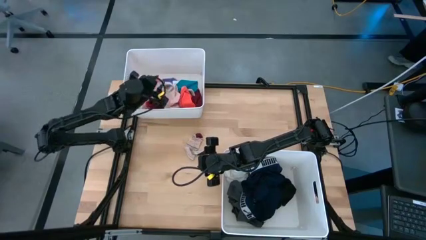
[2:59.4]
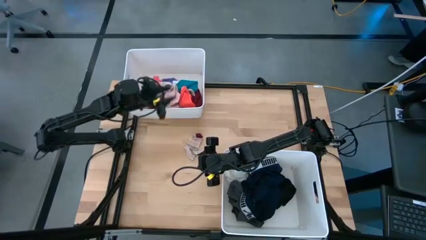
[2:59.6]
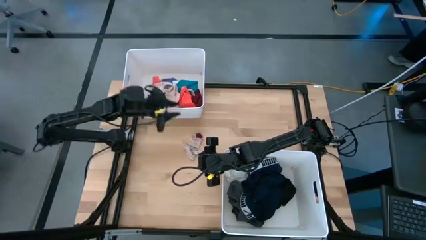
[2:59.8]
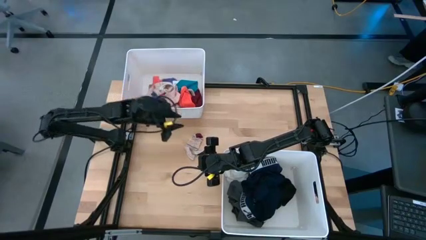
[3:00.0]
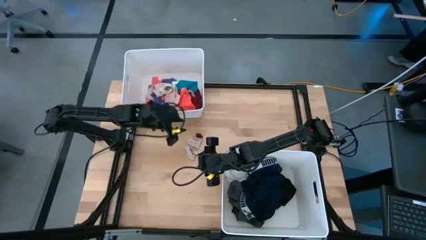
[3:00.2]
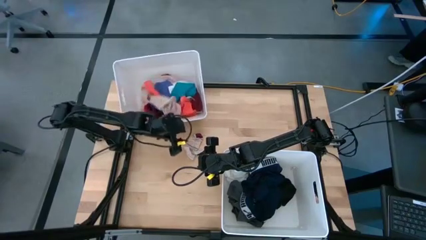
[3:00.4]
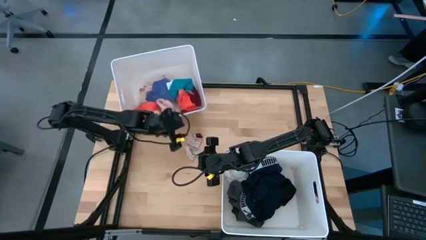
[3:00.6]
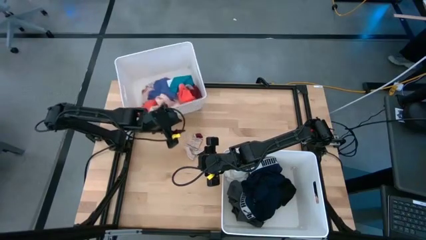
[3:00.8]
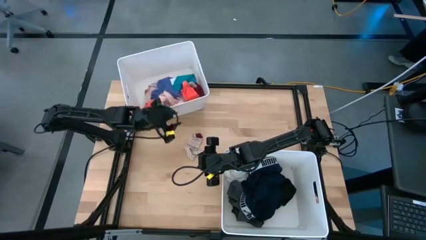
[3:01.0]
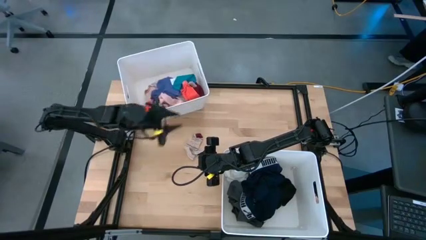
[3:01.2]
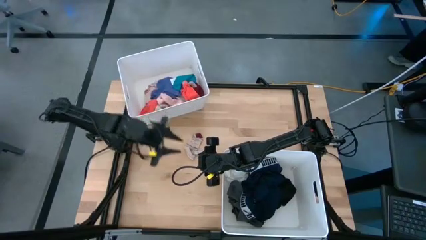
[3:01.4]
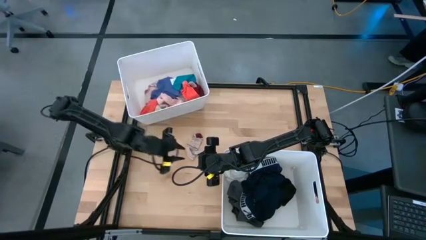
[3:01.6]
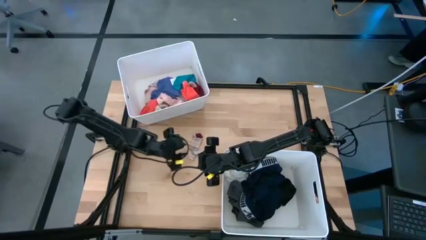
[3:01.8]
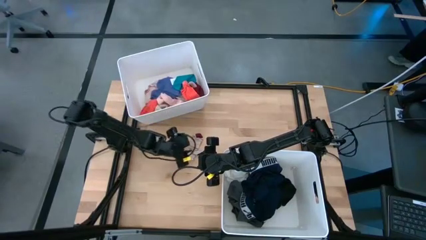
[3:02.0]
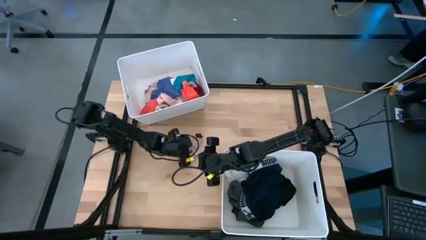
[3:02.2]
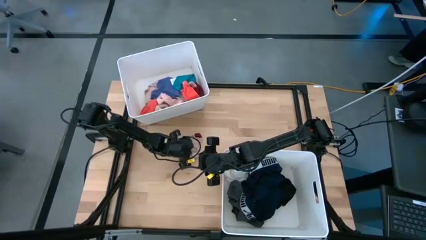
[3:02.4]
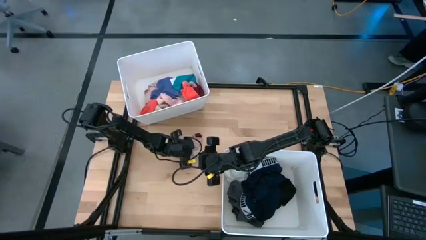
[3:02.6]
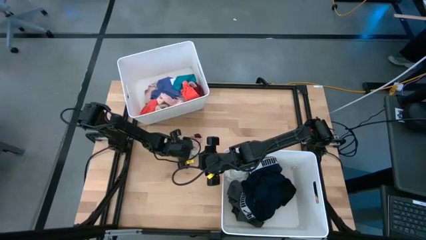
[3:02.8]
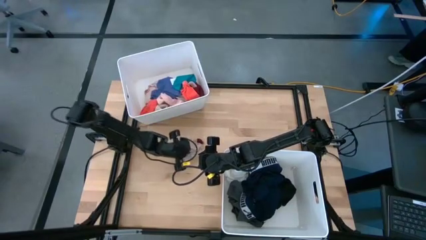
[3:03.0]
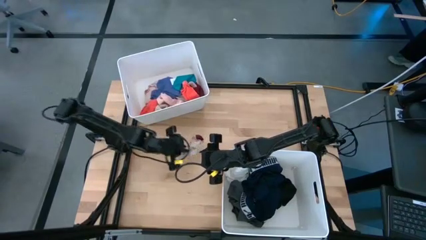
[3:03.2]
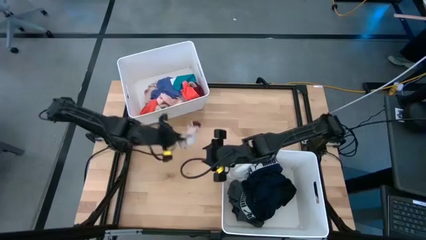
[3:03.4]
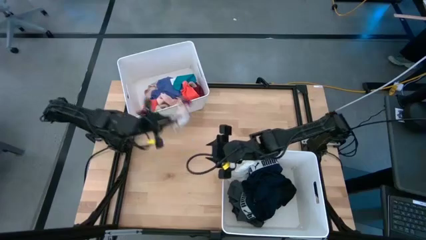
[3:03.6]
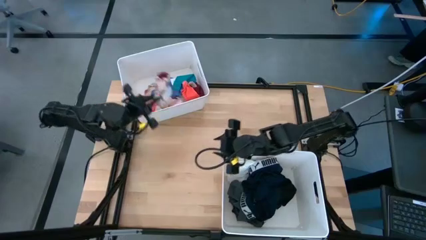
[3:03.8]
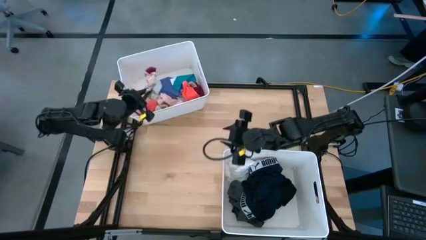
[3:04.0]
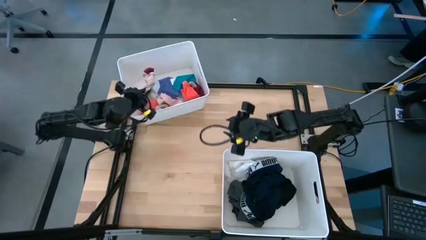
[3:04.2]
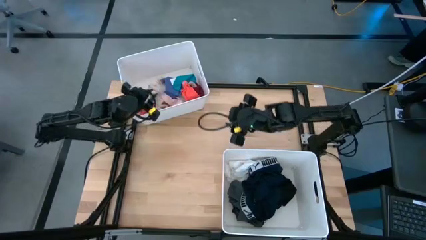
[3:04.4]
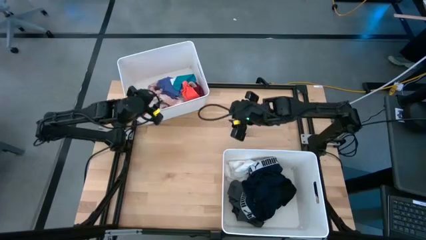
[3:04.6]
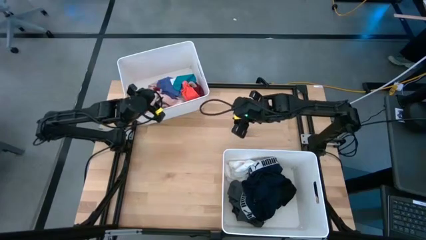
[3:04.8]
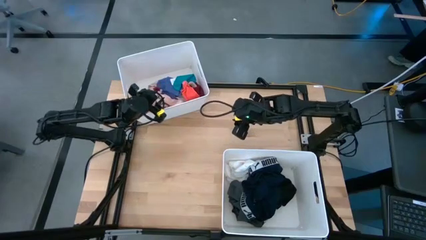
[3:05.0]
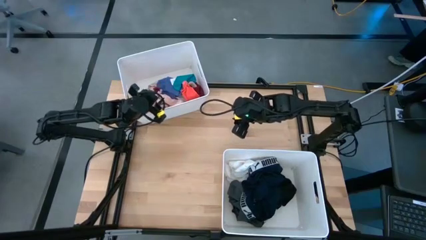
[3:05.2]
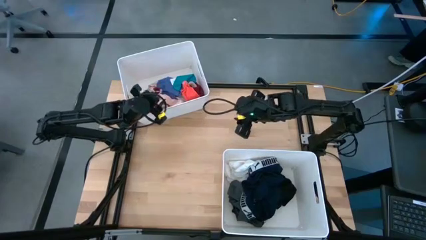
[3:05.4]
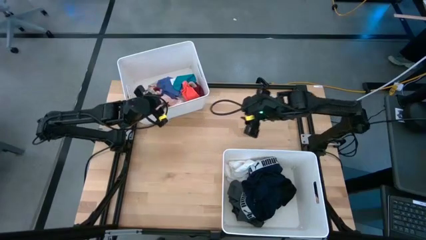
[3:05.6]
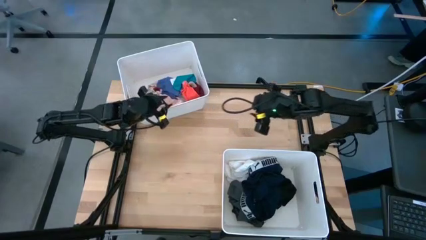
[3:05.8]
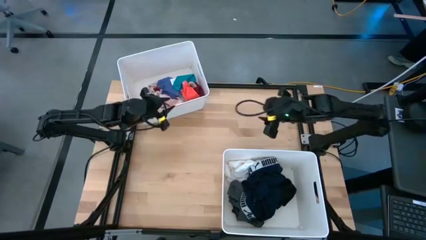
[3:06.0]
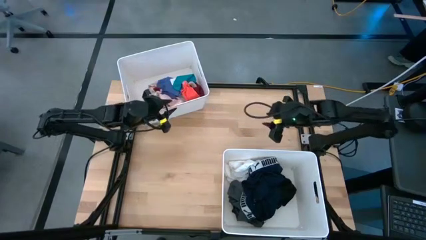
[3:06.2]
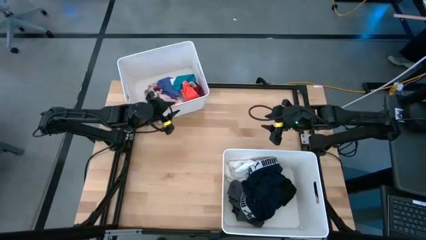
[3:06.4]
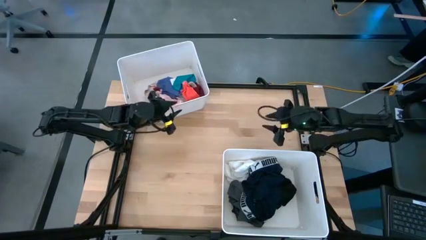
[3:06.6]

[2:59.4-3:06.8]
Task: Sort clothes
Put the white striped sock into the top white bin

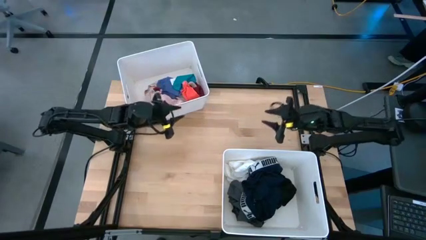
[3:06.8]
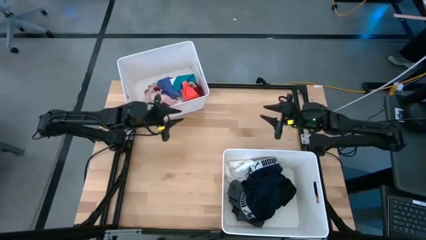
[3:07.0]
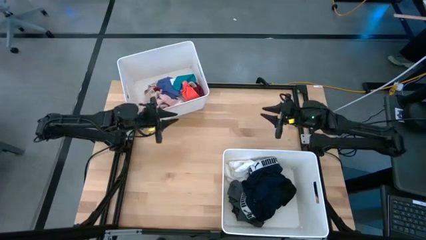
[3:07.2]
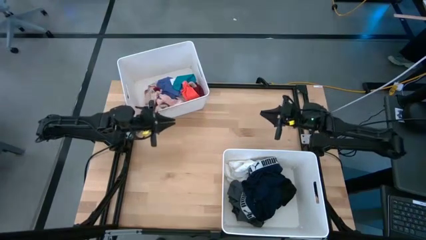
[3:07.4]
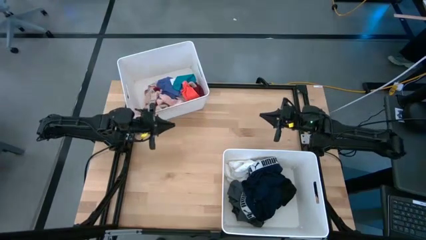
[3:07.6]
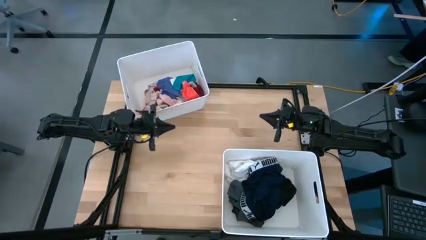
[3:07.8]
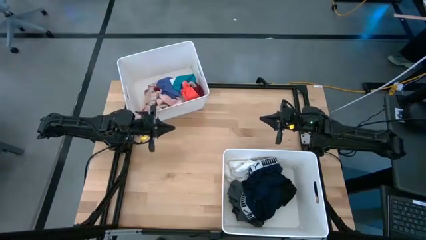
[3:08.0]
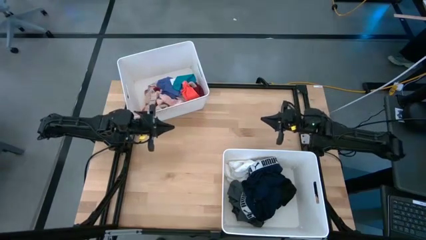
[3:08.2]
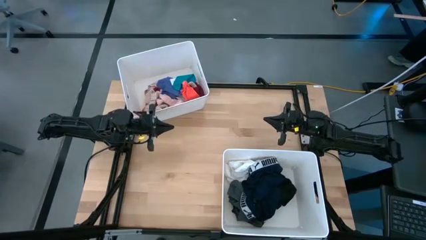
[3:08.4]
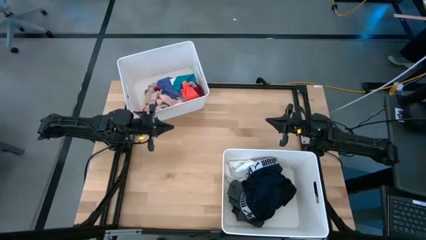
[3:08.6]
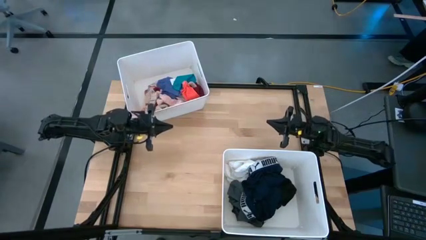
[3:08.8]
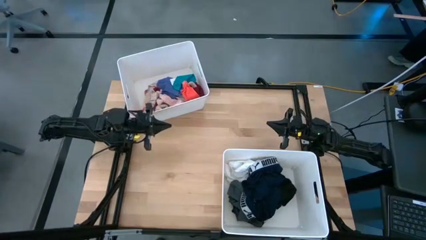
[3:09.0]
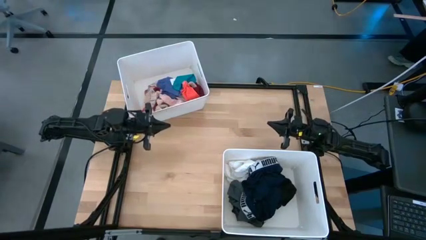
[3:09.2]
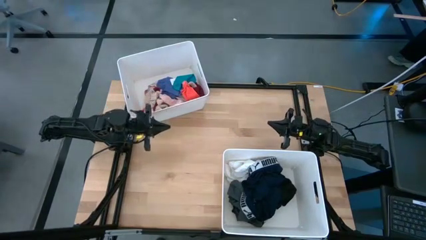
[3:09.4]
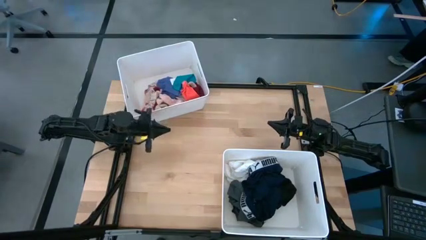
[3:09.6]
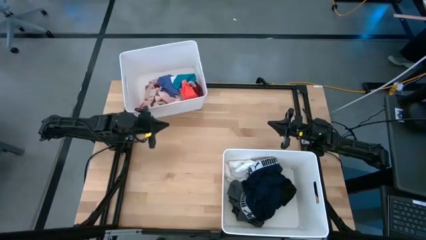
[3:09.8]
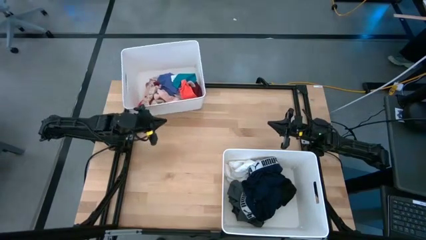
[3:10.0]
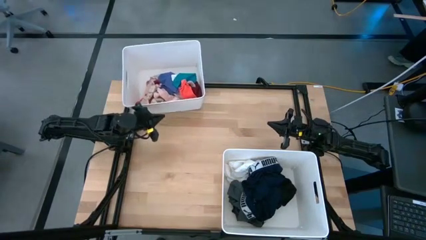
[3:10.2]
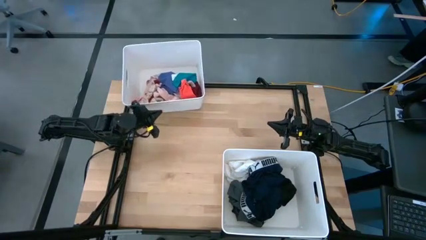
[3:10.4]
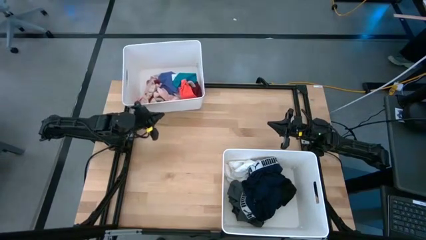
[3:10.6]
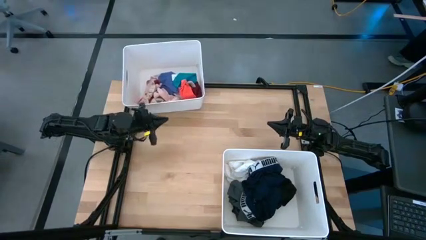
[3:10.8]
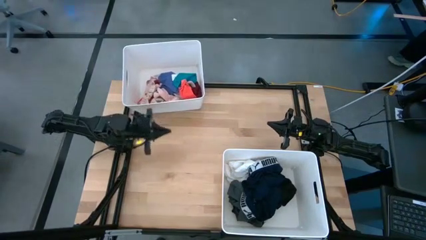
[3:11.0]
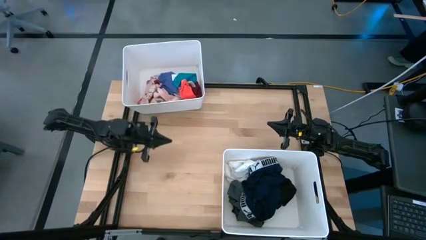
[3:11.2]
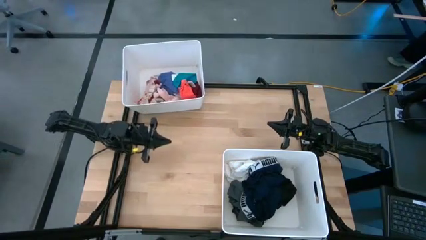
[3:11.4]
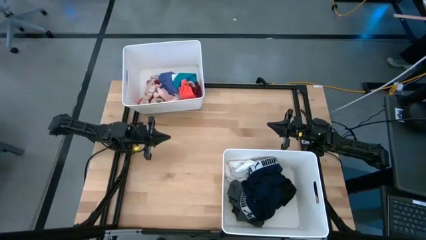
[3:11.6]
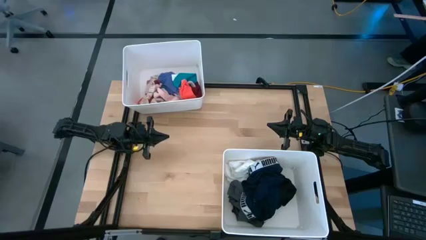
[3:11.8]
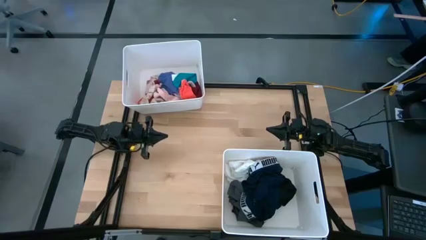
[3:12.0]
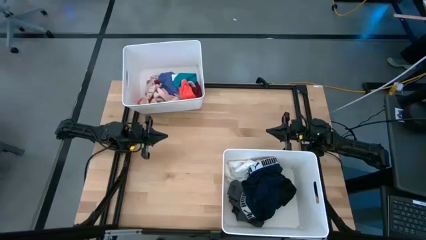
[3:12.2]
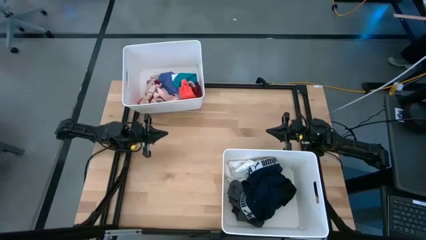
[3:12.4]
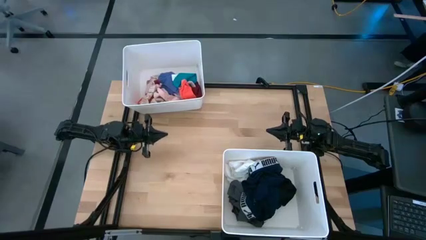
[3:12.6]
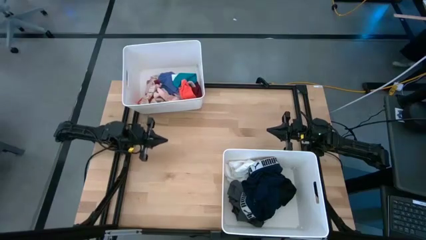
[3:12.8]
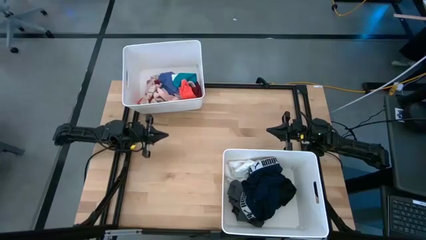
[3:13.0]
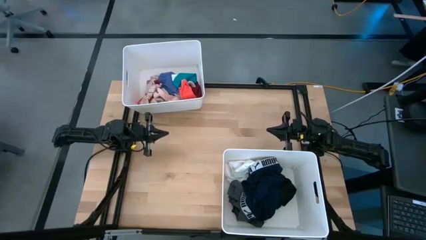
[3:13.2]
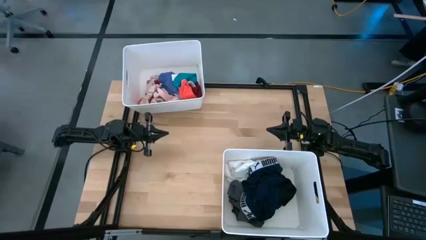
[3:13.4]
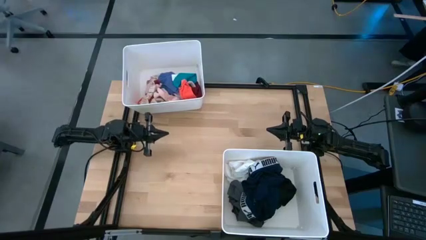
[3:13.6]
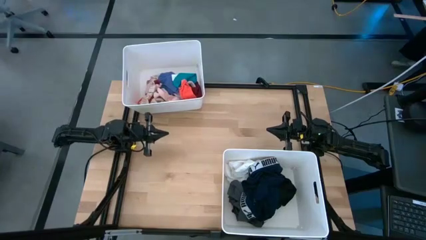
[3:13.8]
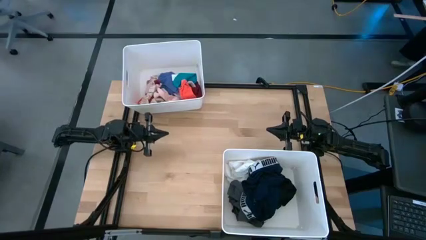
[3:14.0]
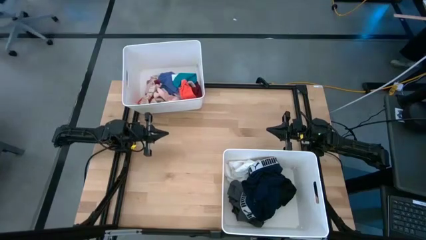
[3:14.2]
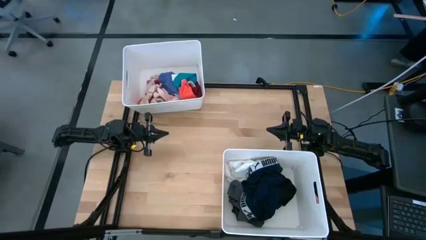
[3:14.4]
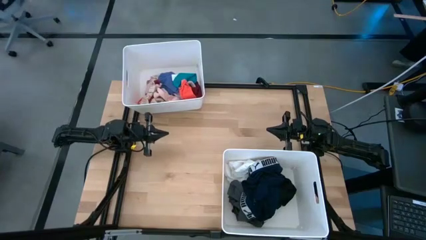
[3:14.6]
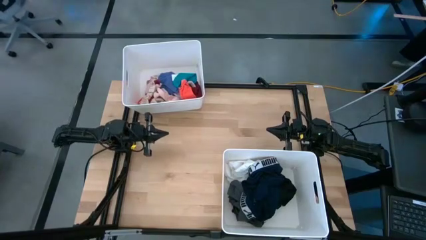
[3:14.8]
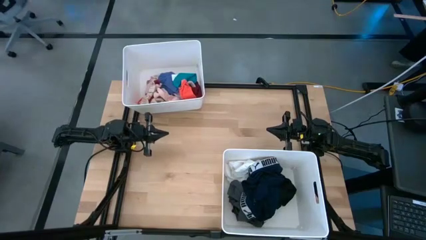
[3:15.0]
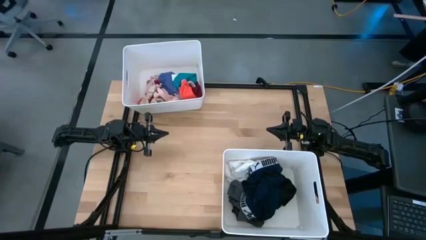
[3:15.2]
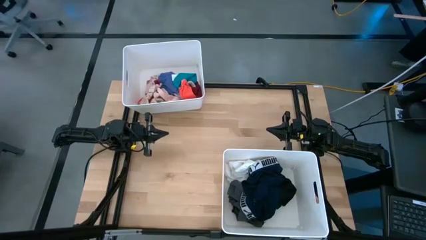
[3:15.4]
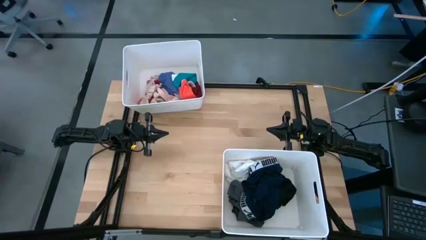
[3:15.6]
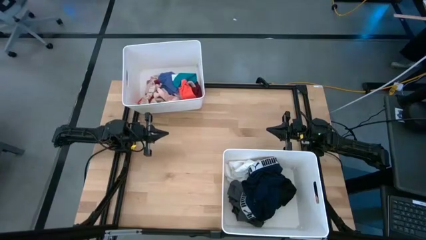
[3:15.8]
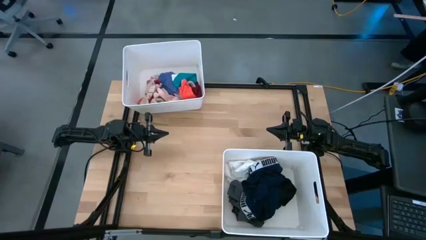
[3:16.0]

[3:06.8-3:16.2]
Return to Home Position
